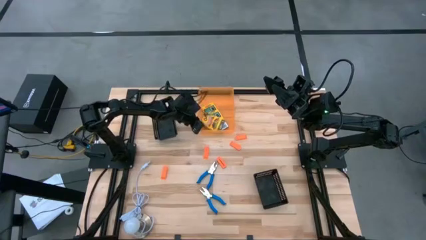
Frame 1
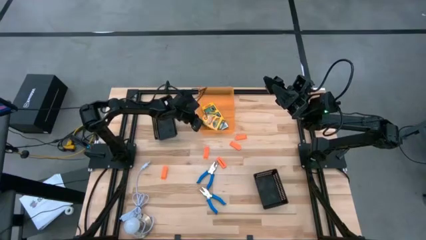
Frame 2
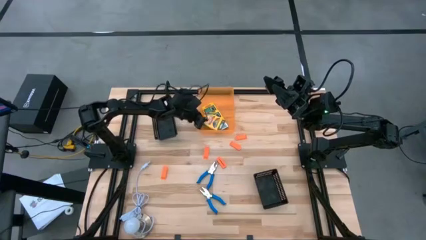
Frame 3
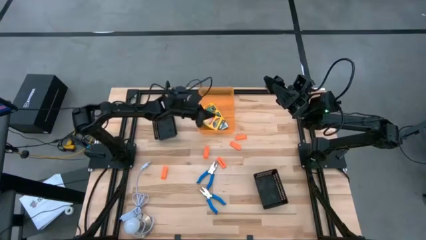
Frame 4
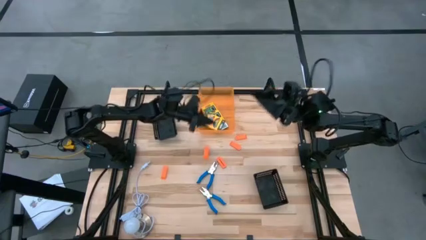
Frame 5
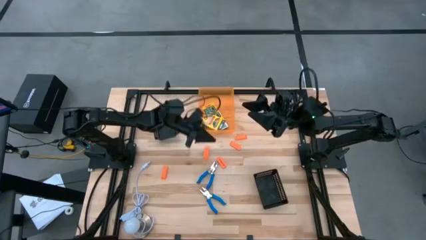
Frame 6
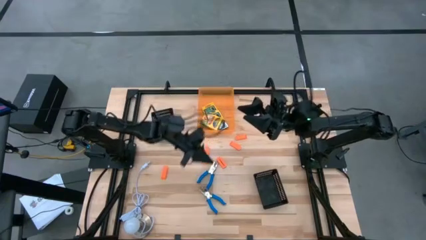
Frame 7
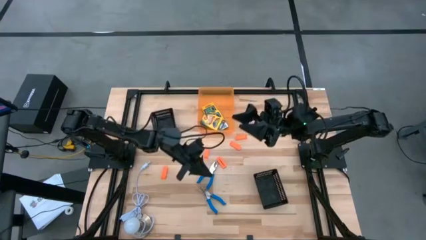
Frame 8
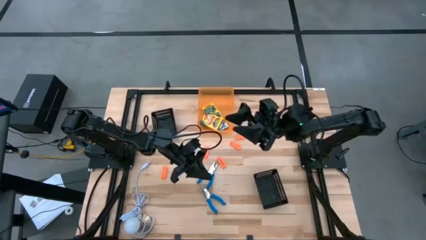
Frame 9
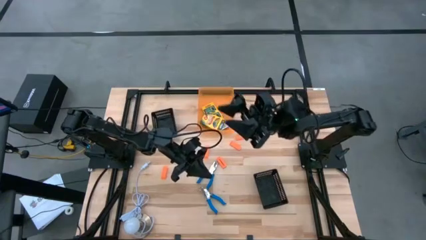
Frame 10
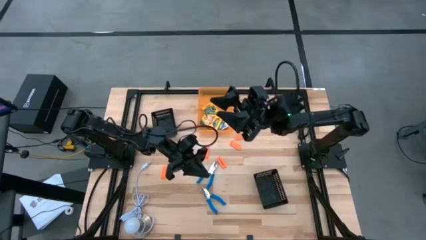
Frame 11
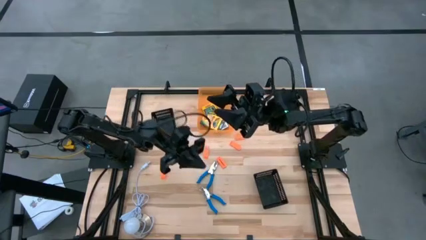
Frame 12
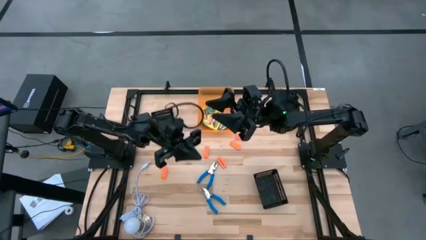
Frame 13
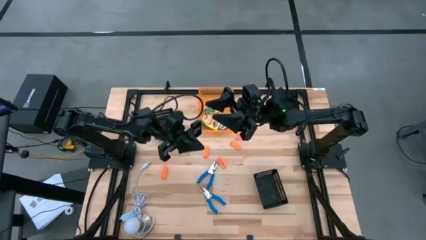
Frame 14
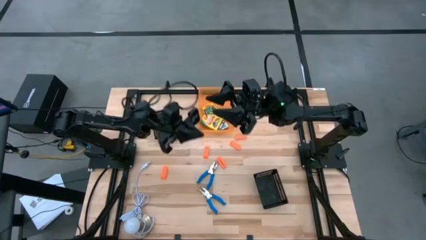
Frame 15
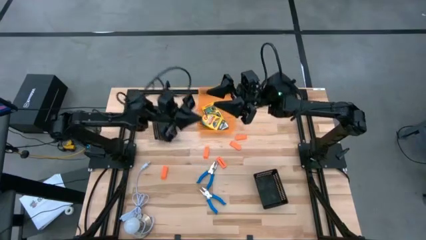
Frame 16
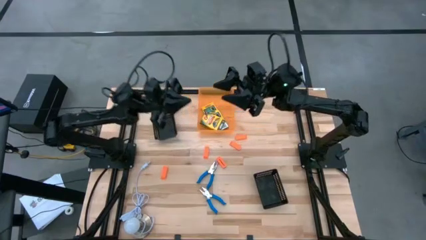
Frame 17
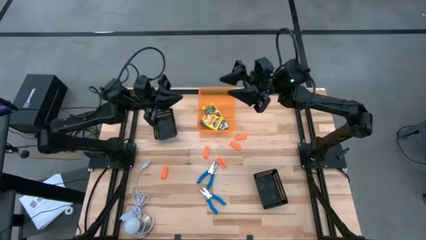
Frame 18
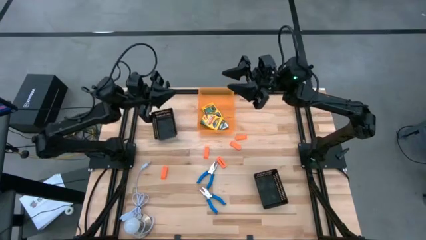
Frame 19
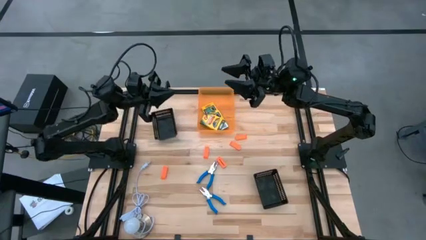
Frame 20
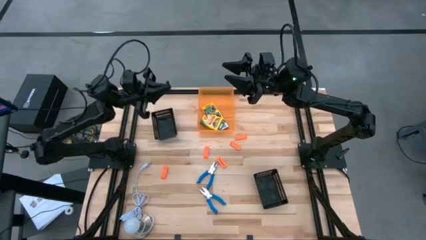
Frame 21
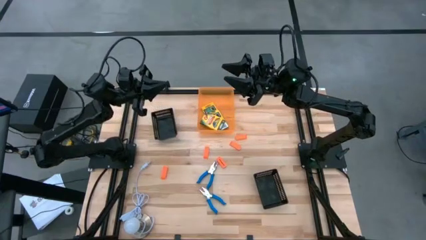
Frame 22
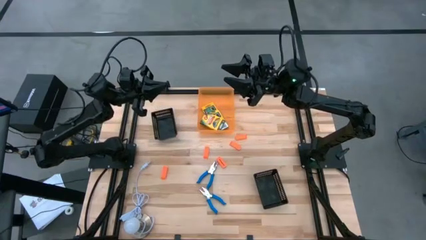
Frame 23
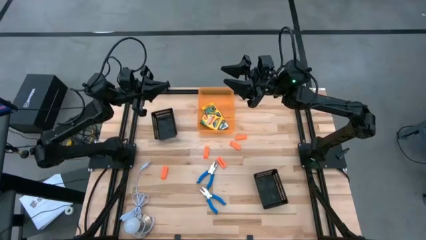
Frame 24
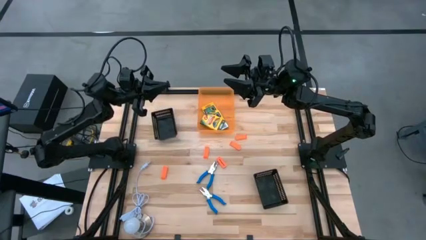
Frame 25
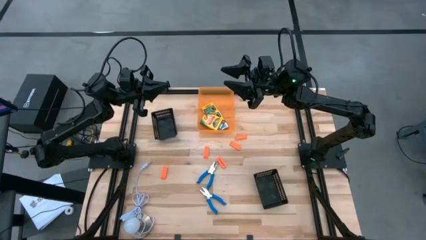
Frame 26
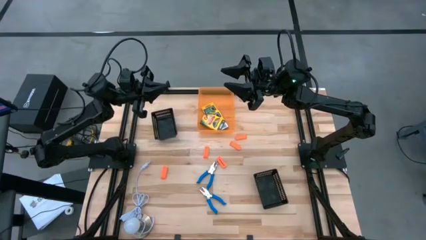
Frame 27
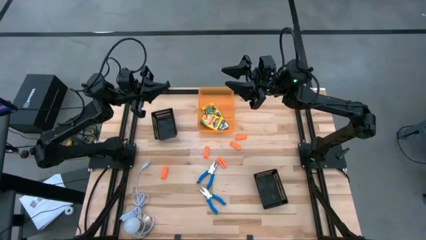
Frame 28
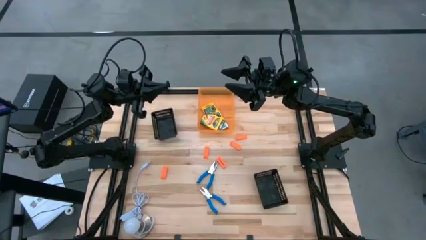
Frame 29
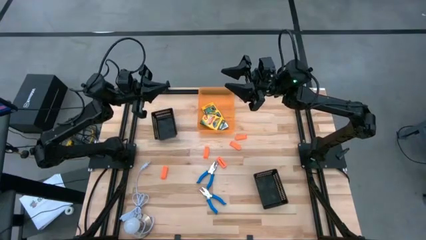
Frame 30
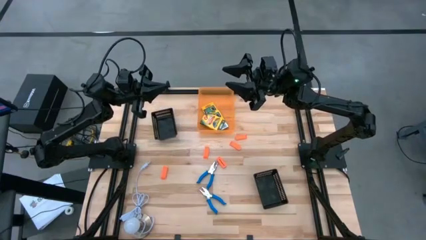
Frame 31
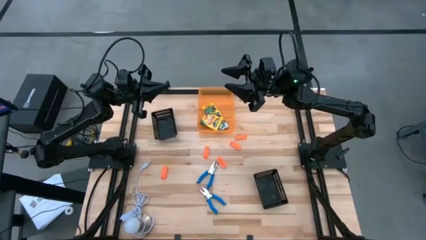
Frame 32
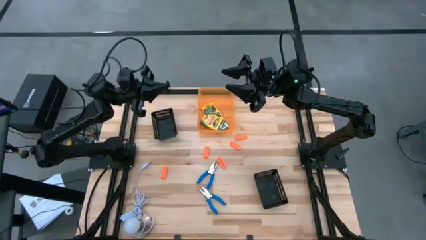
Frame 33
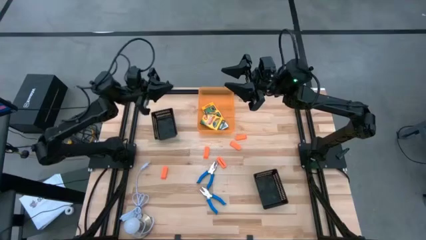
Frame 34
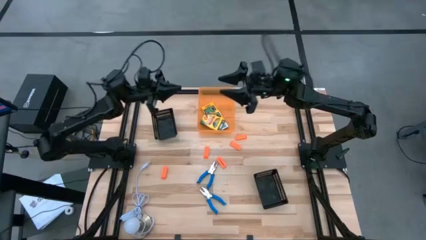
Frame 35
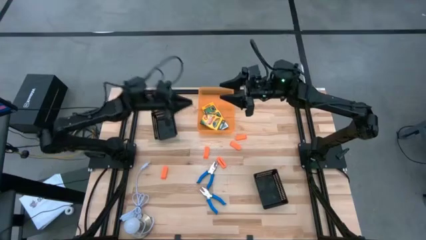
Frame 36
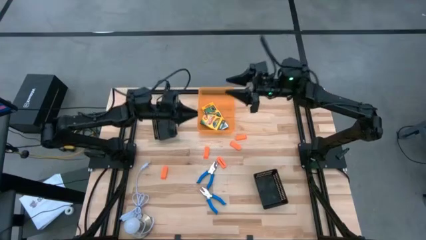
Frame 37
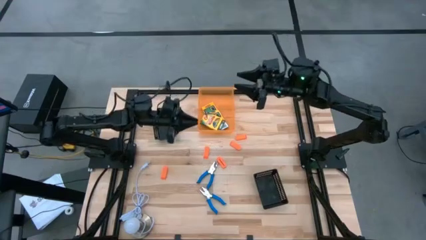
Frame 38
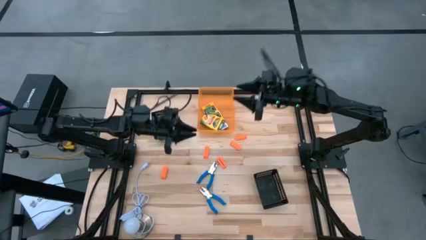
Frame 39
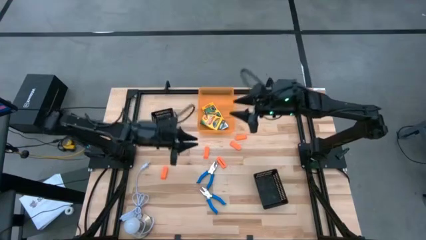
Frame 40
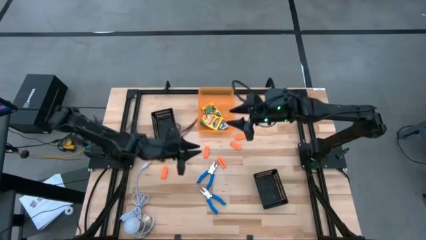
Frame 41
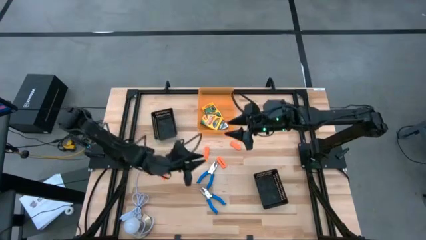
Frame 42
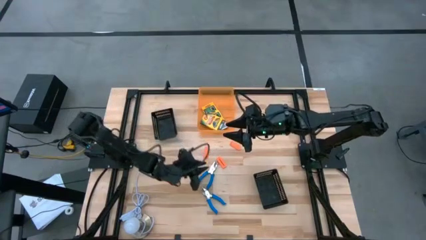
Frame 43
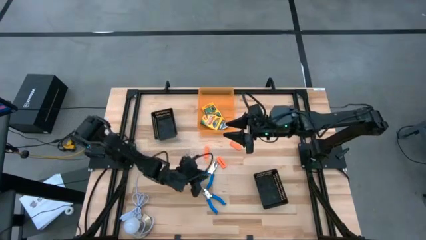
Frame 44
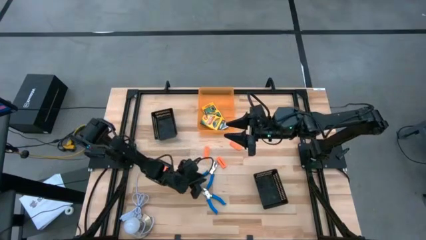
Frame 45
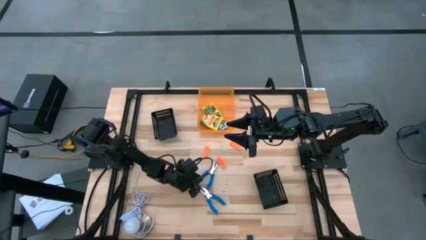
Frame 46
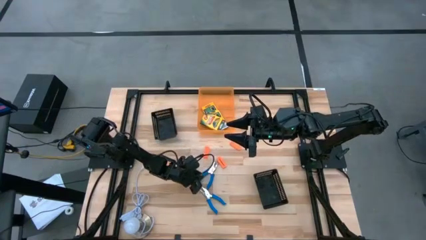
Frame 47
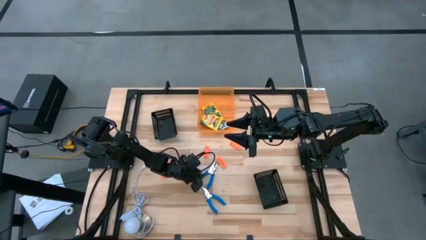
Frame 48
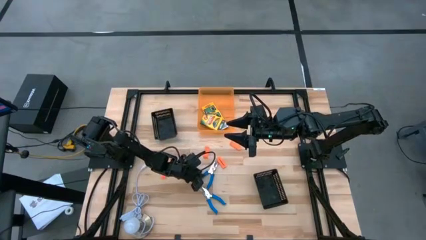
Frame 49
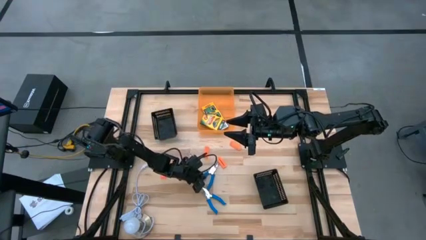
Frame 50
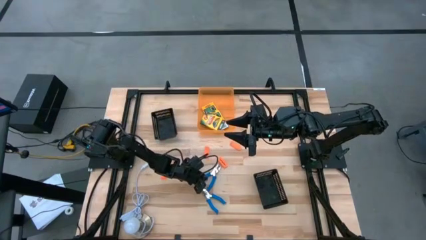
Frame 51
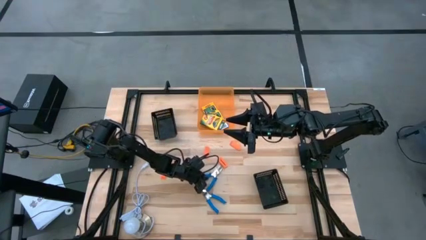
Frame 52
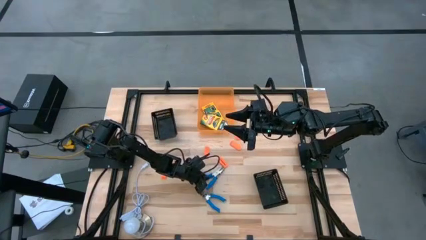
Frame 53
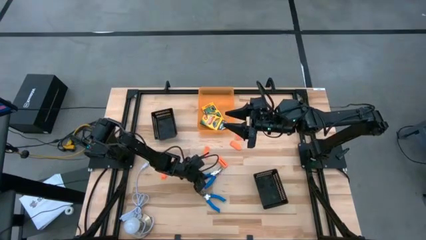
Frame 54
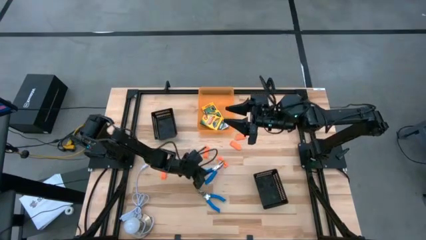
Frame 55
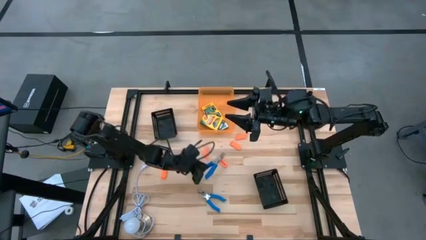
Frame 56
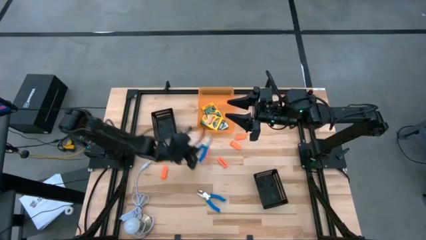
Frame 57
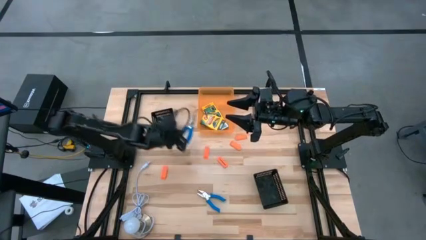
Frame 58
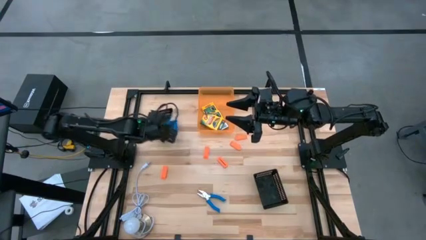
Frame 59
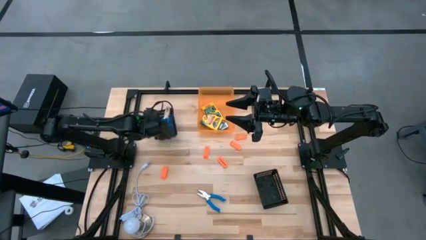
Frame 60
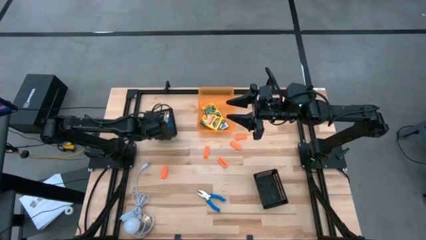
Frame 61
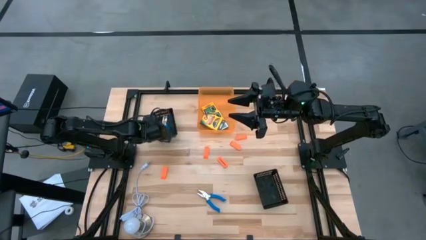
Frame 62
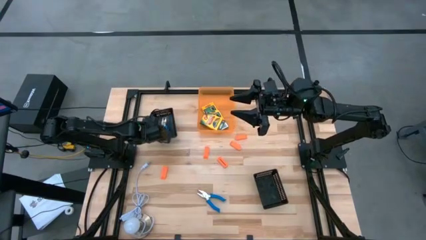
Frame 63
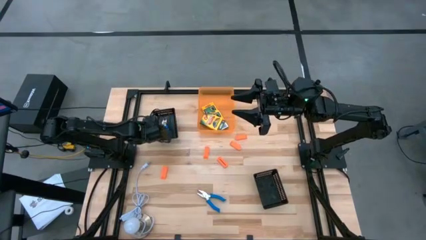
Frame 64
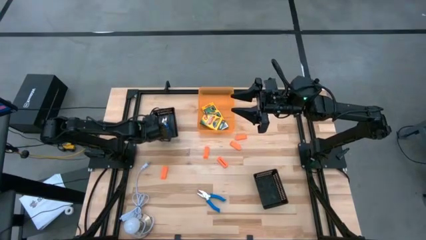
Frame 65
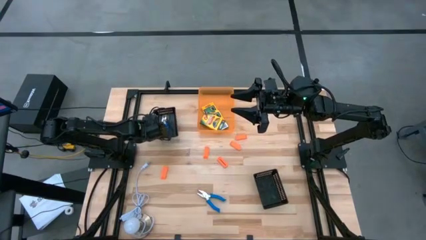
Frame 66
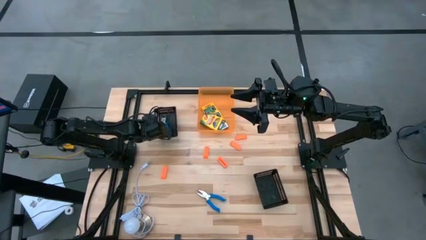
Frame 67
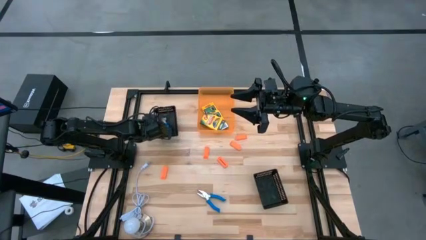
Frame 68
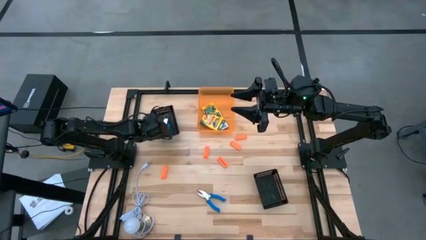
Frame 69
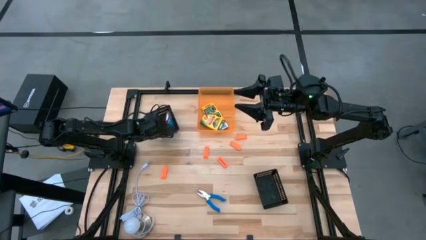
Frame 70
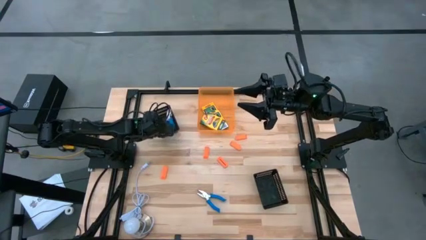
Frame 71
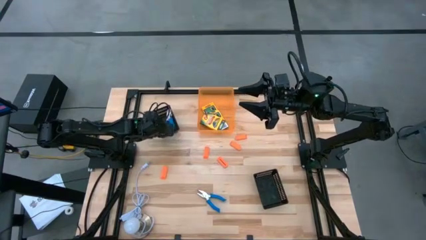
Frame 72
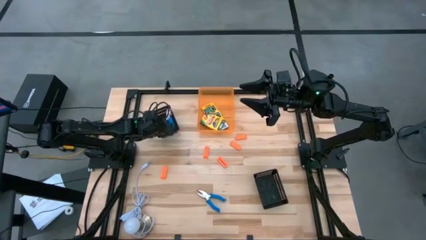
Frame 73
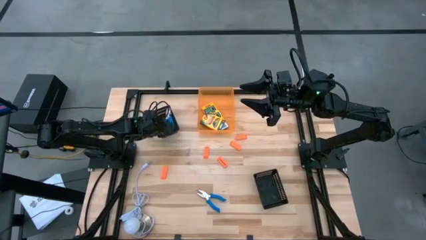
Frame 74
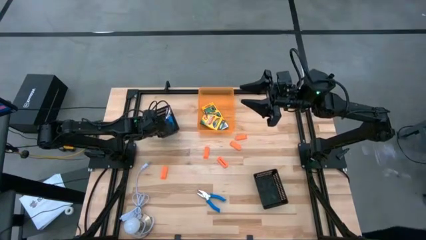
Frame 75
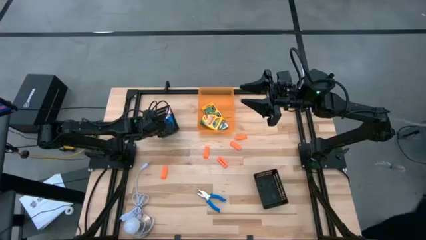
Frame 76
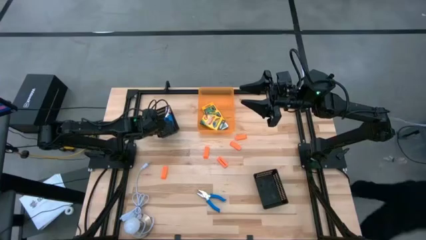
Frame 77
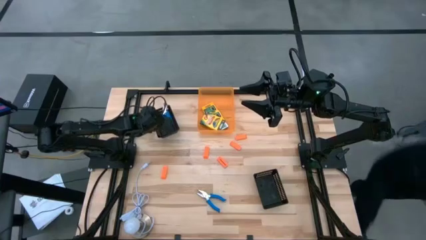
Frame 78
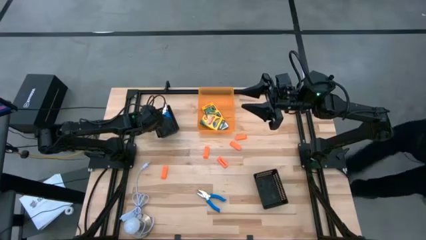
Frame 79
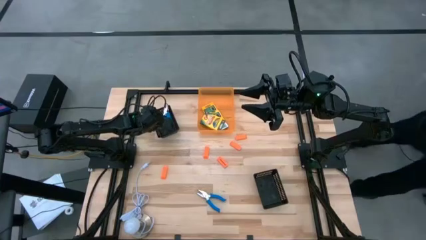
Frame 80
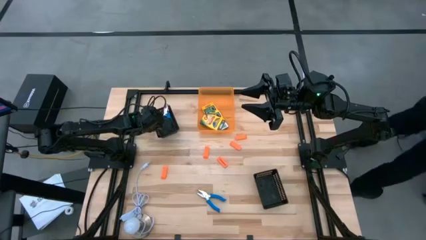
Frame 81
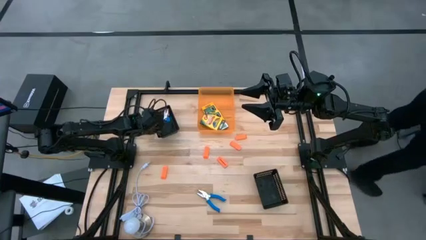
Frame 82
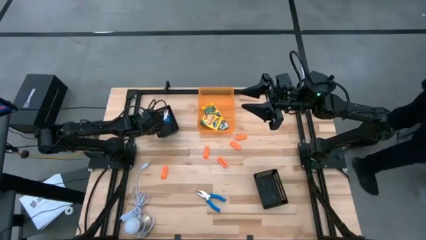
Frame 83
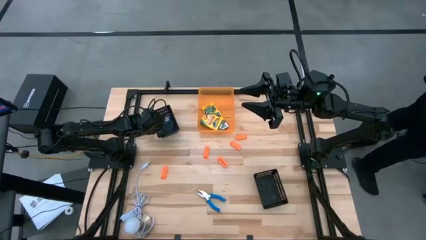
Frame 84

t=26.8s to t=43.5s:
Task: Pick & Place School Supplies
Put the top blue hole puncher into the top black bin
